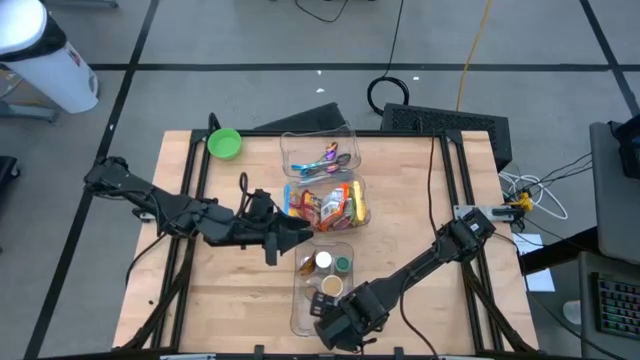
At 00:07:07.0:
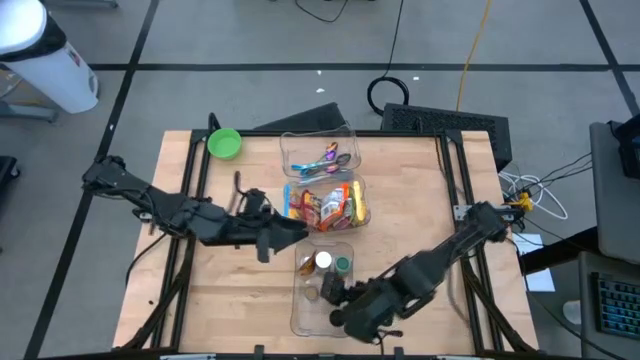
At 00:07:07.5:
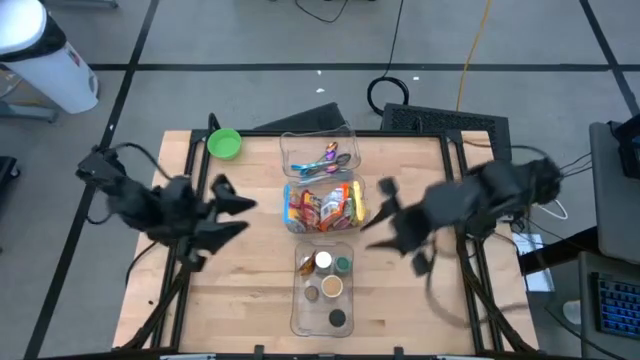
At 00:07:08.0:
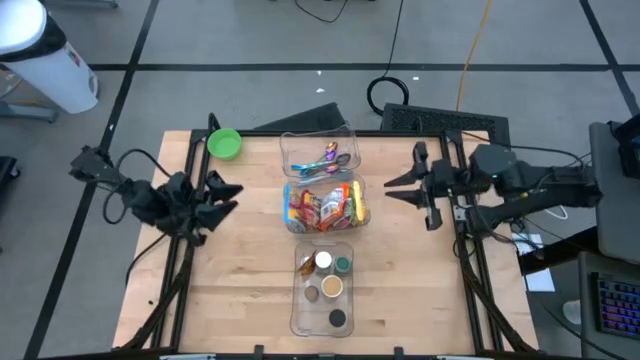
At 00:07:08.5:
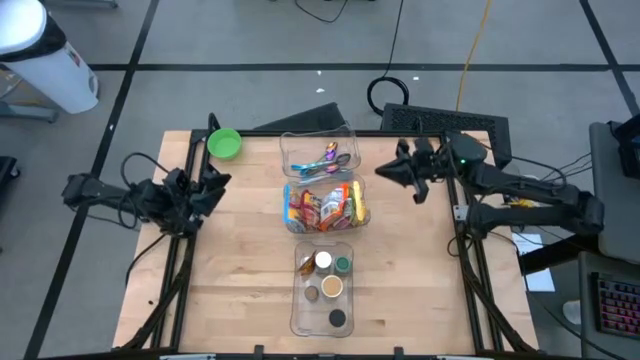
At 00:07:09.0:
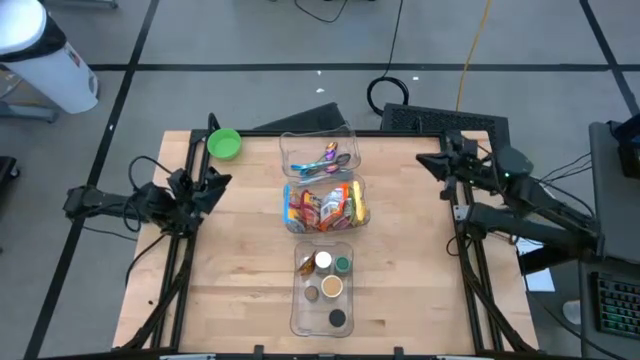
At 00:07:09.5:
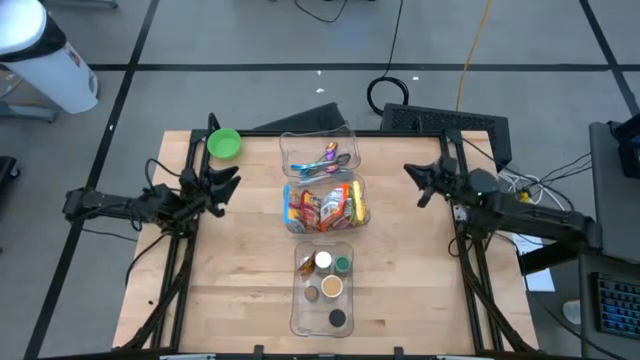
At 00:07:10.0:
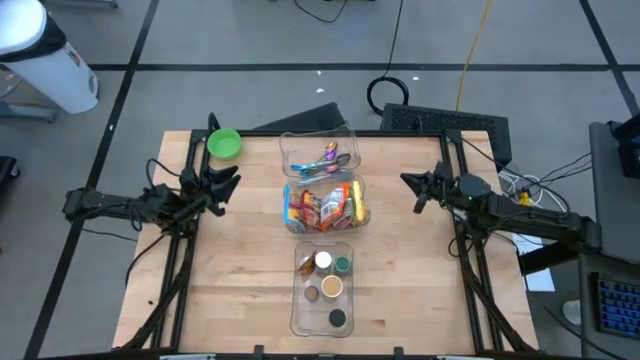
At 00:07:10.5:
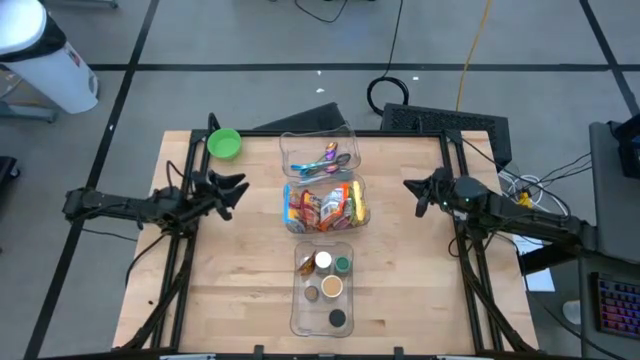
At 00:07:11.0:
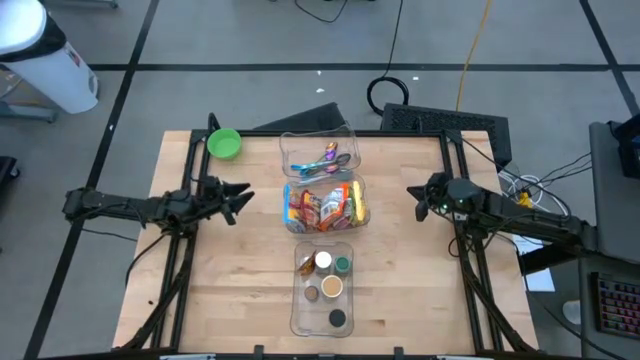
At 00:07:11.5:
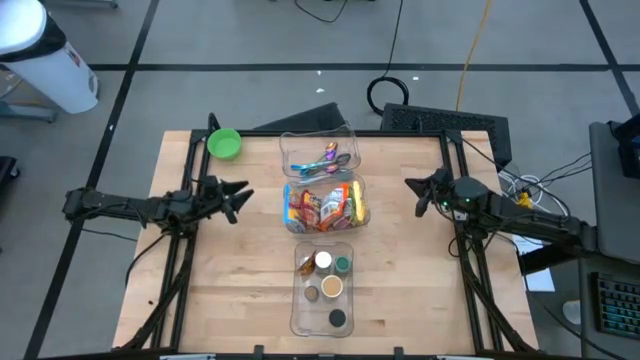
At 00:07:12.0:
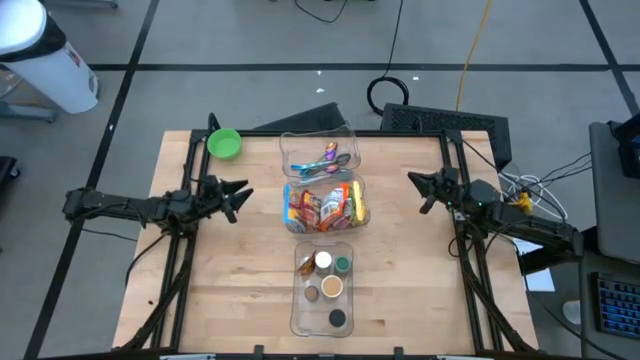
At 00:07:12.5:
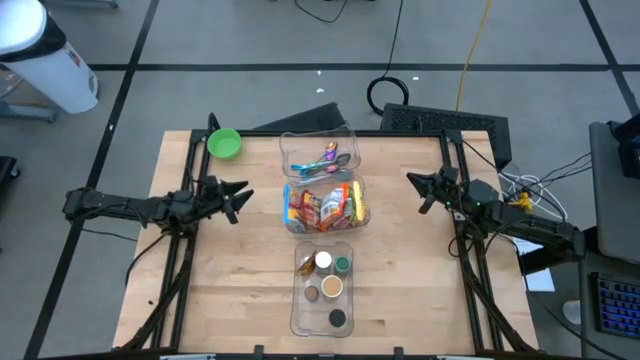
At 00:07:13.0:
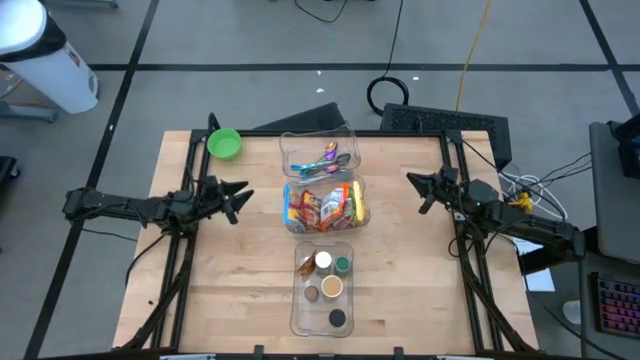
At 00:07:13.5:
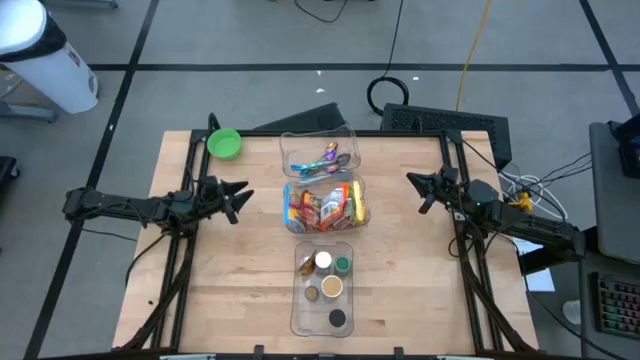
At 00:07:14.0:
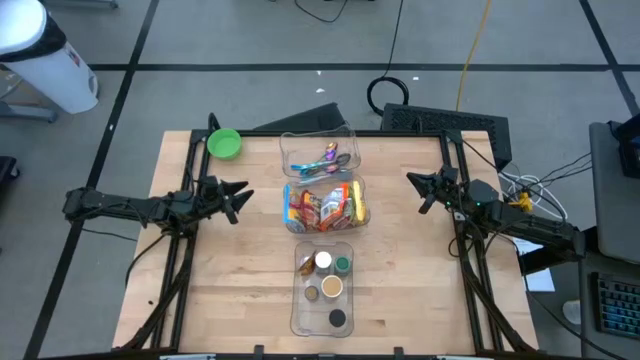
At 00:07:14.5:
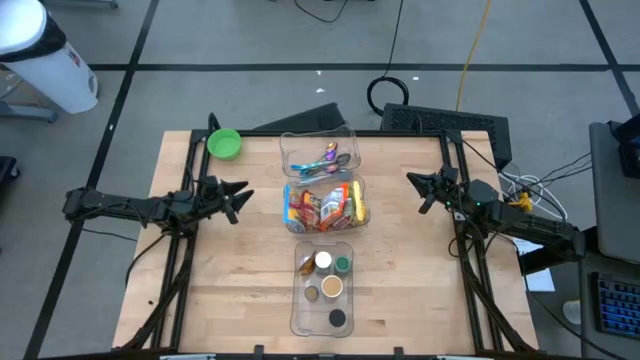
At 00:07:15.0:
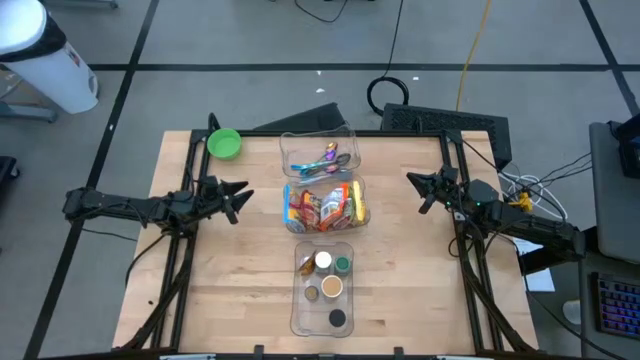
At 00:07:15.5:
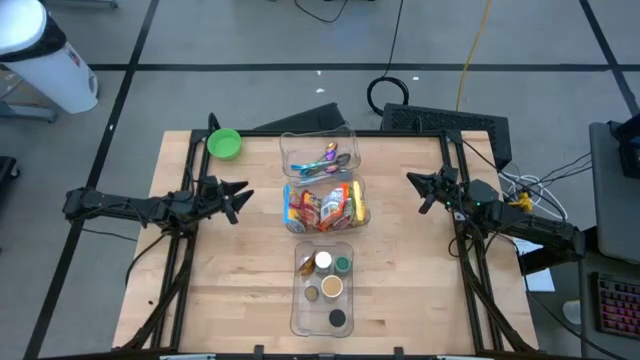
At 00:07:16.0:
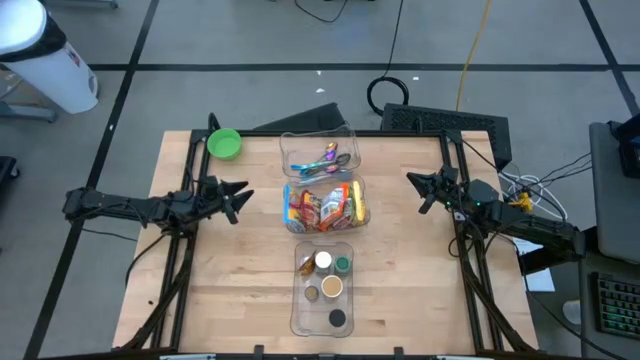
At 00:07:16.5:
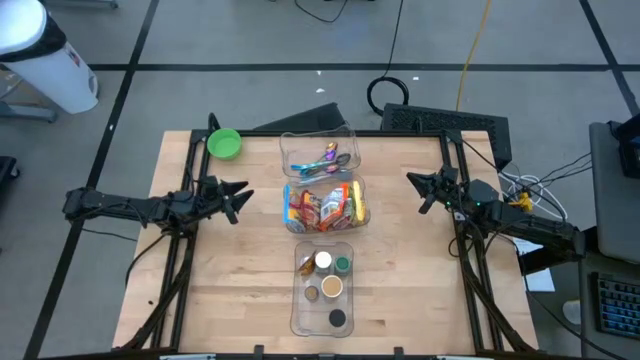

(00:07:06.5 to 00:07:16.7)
Task: Pick & Place Food Item
Return to Home Position

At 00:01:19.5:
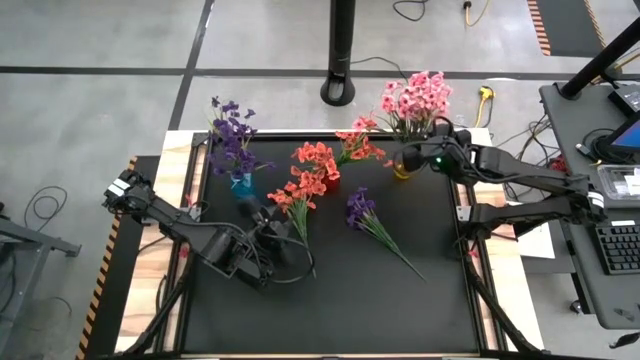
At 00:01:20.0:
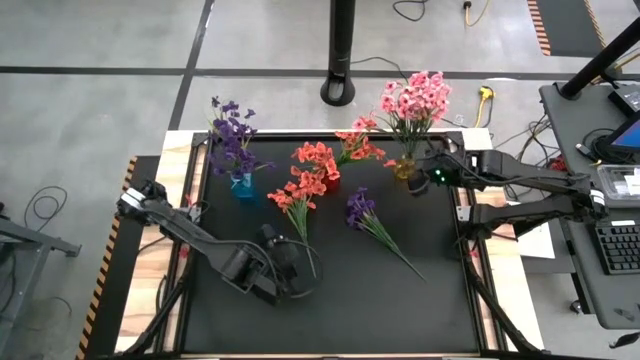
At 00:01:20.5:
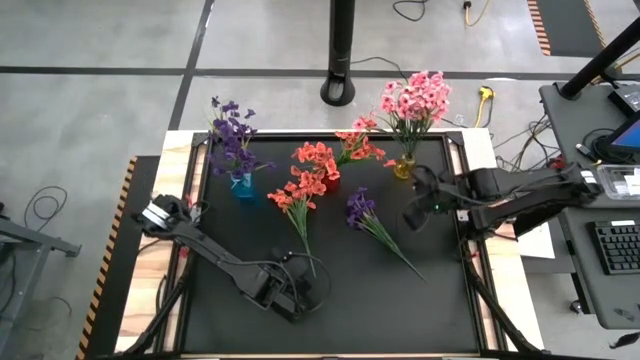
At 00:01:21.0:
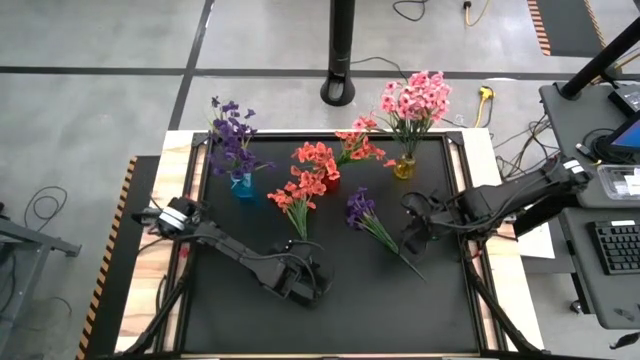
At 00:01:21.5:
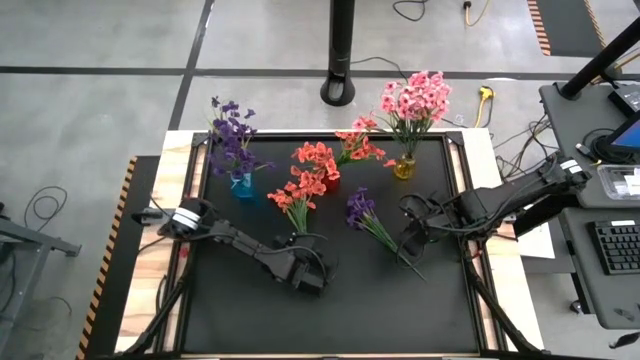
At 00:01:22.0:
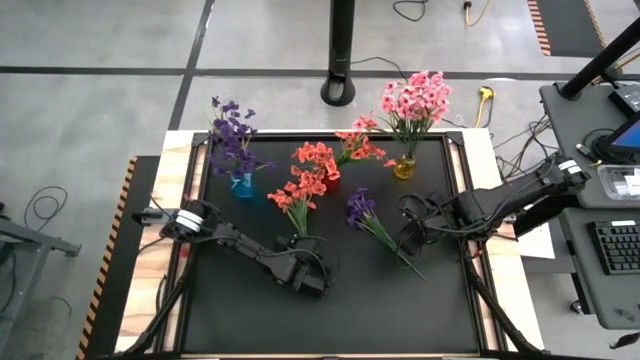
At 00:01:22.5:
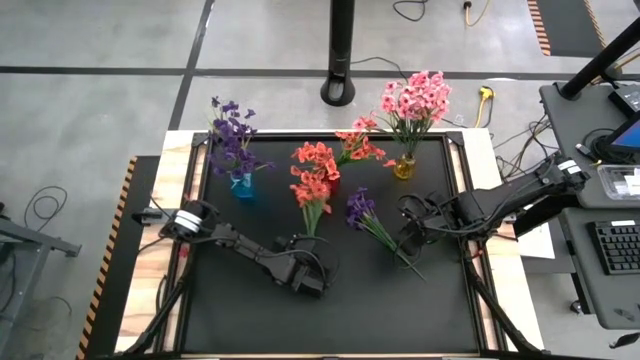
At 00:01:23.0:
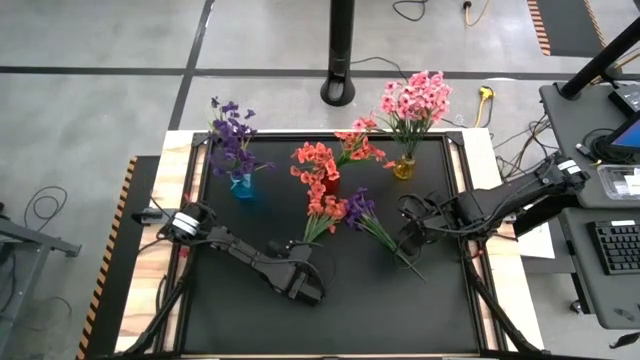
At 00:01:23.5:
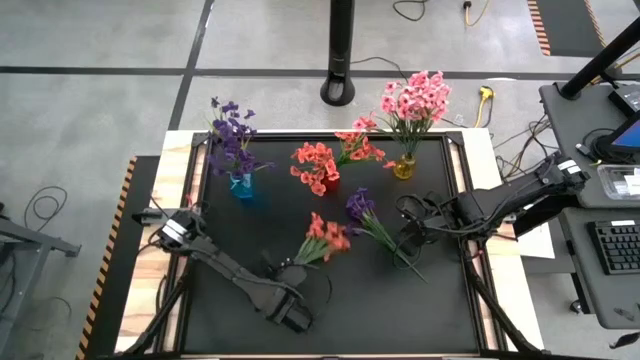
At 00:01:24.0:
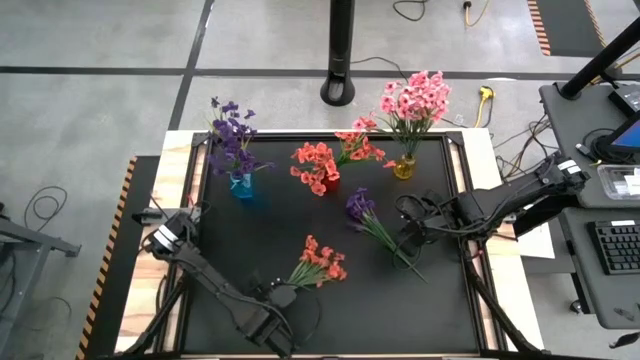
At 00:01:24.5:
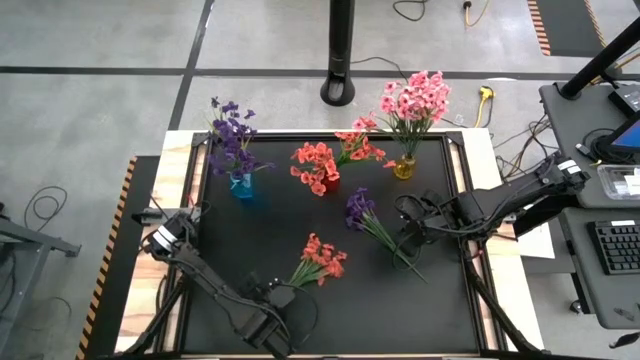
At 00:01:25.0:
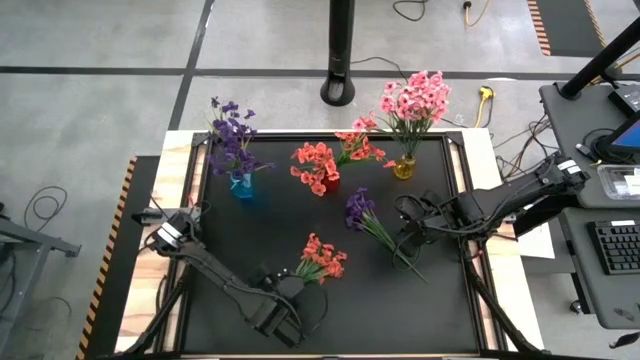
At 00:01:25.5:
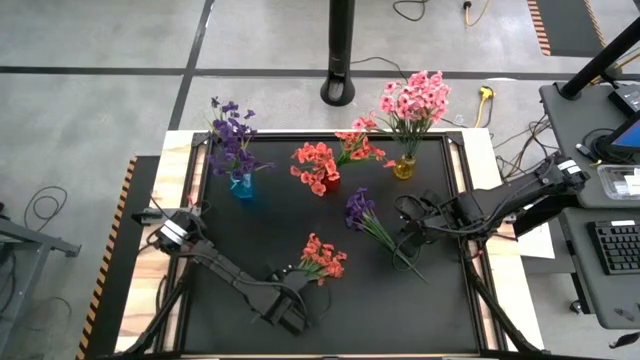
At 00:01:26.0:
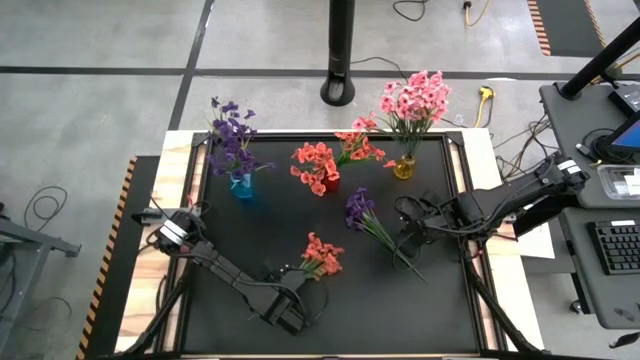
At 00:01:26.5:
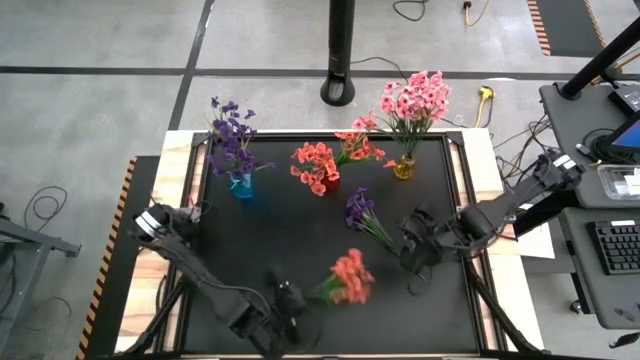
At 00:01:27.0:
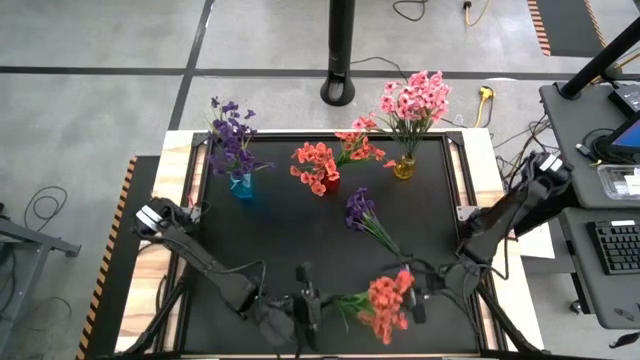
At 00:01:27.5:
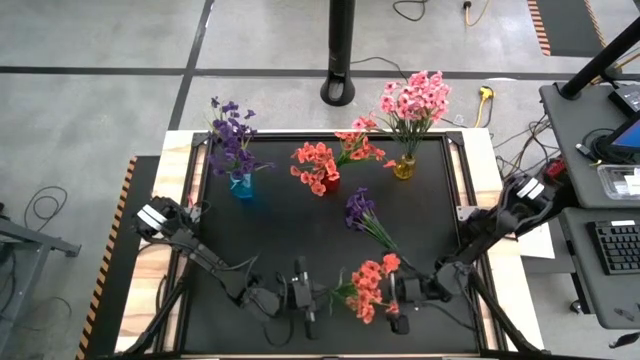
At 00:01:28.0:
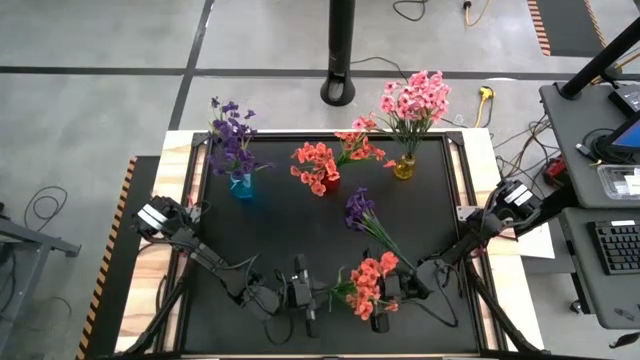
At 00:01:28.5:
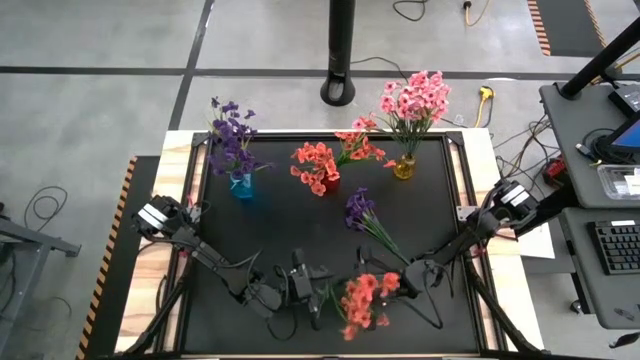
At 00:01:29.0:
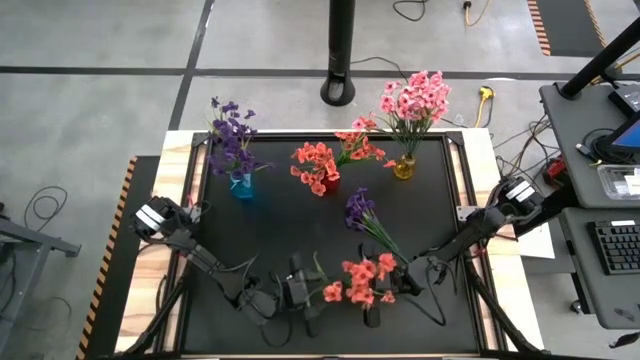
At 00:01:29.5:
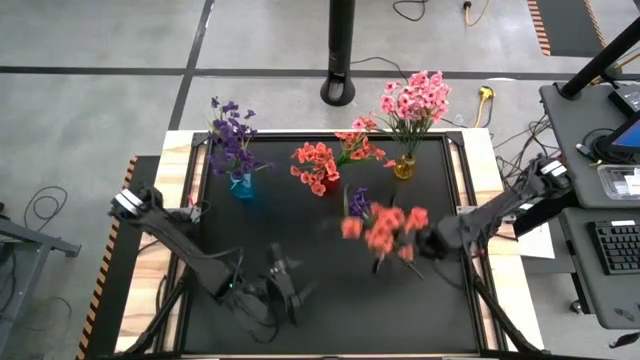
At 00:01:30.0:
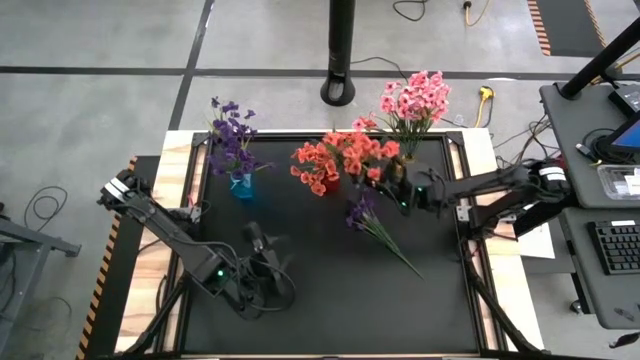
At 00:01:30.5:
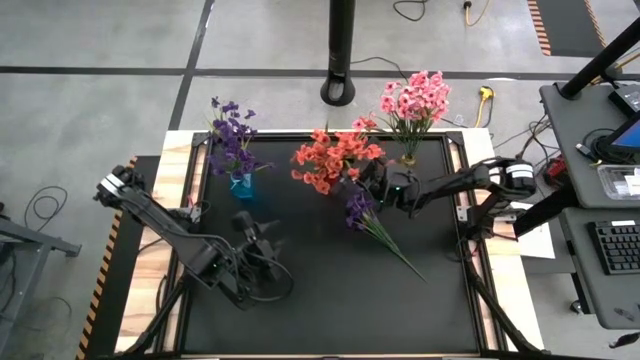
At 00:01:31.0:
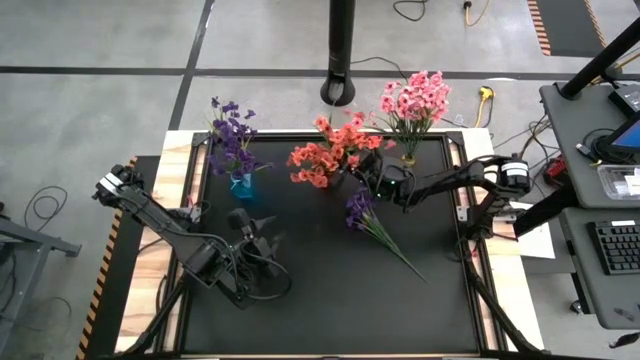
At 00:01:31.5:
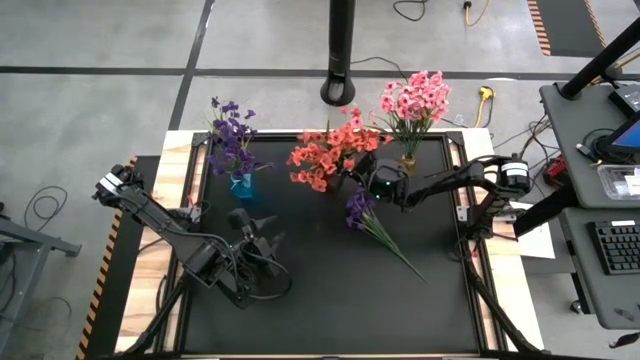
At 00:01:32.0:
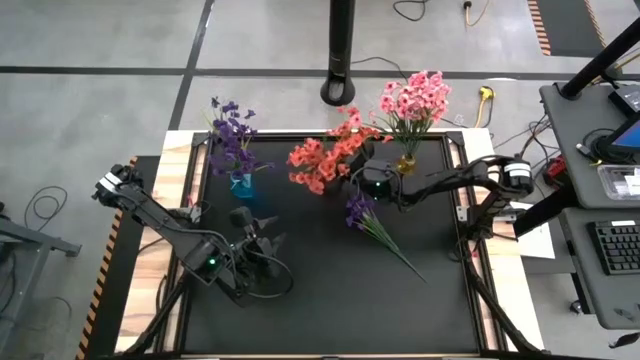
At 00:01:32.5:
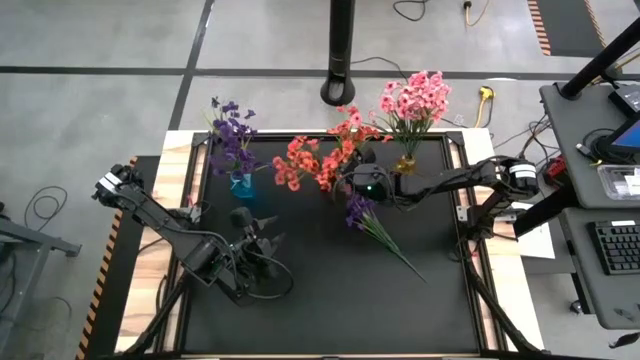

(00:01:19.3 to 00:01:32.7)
Task: Sort flowers into vase by color
Put the orange flowers into the red vase
